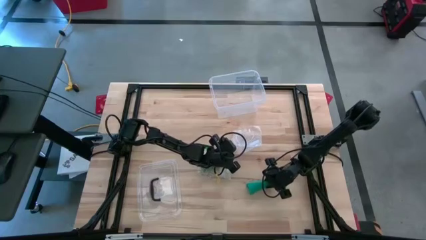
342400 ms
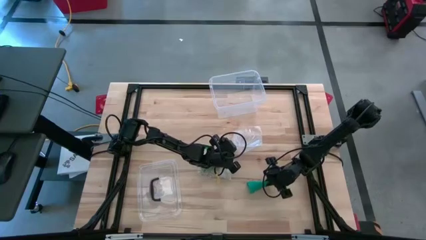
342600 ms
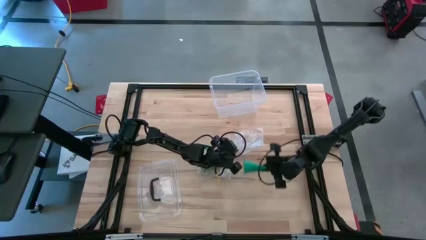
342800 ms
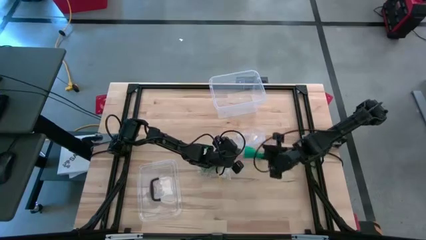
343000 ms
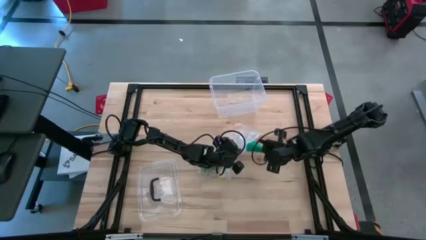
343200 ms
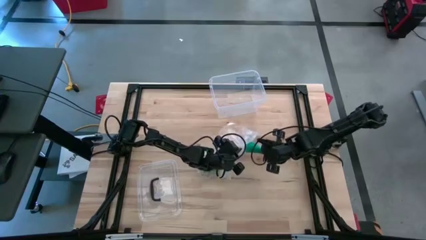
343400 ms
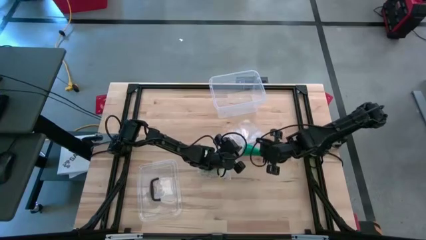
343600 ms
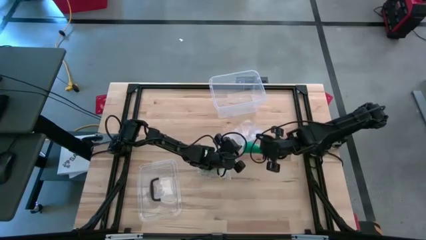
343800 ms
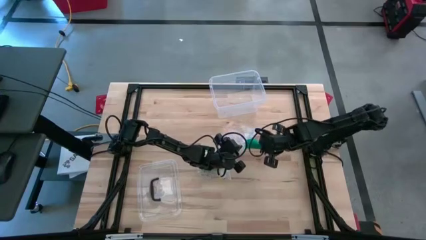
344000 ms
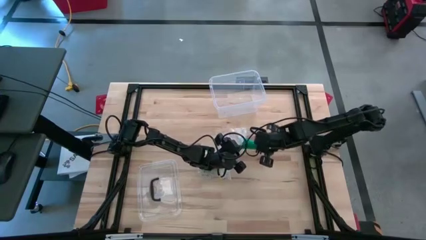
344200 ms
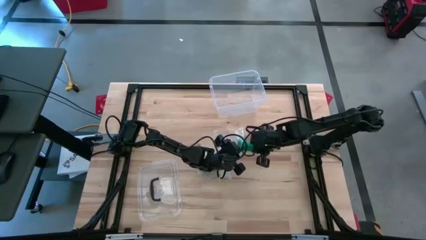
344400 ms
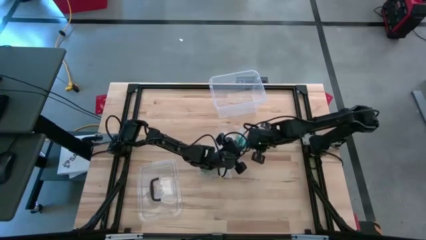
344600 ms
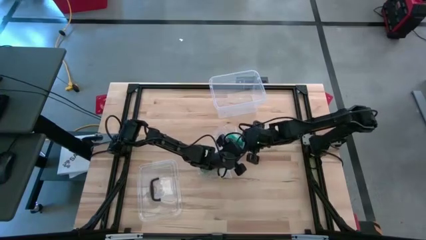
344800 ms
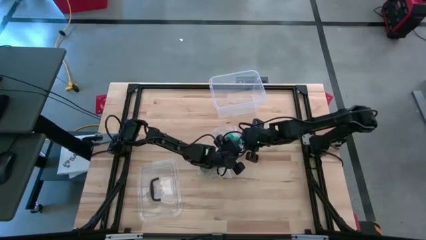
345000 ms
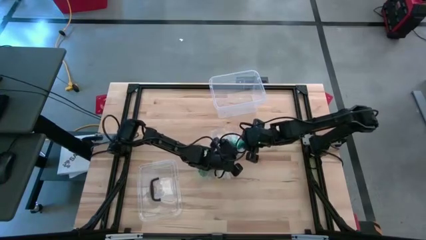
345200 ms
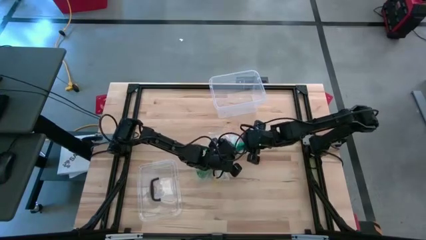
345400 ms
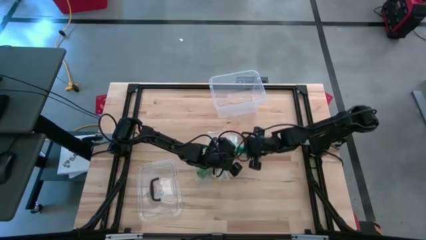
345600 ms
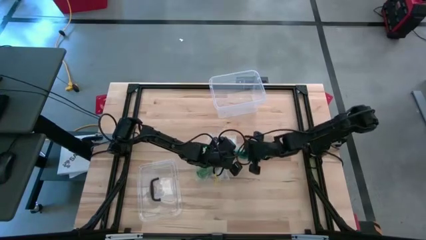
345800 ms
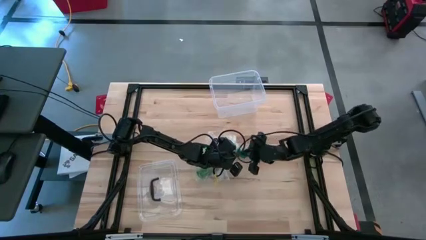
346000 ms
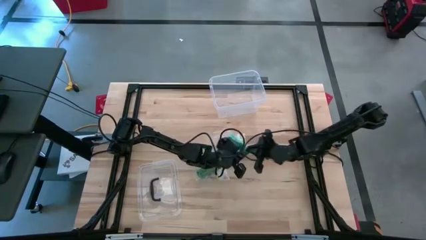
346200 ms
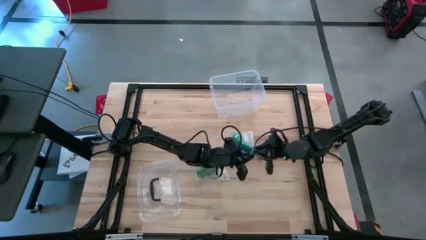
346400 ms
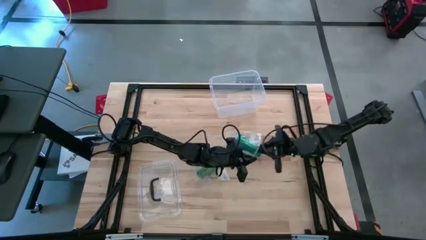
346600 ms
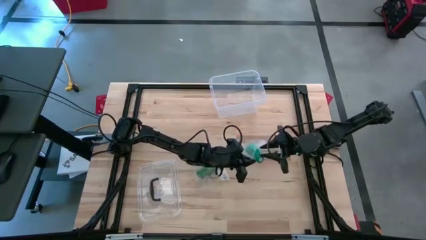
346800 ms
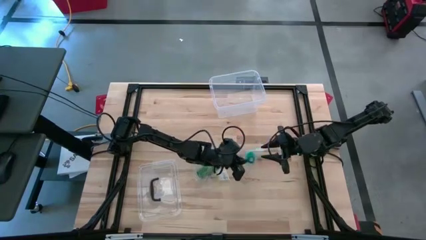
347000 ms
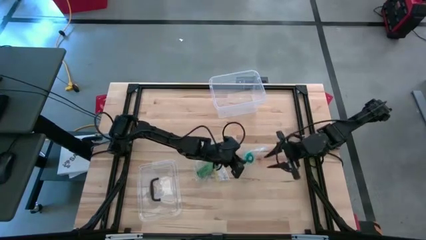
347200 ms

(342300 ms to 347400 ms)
Task: Roll bandage
Put the rolled blue bandage into the transparent zip bag

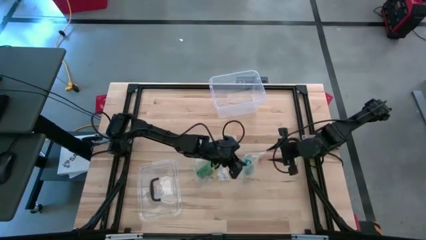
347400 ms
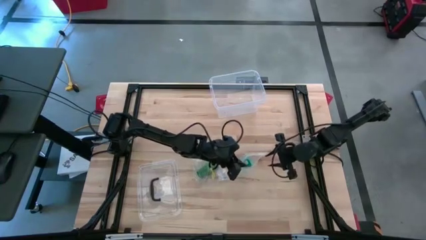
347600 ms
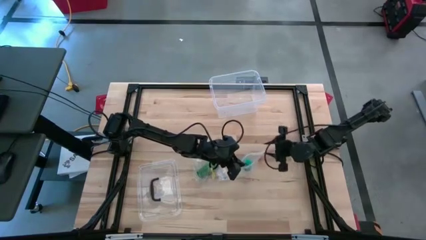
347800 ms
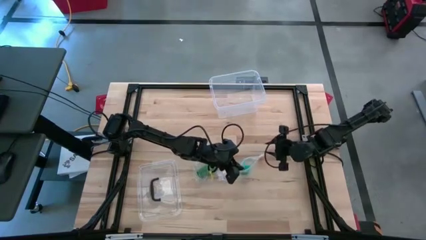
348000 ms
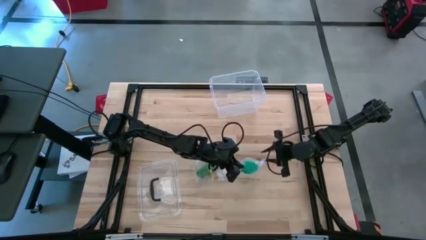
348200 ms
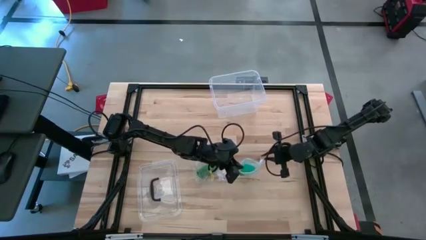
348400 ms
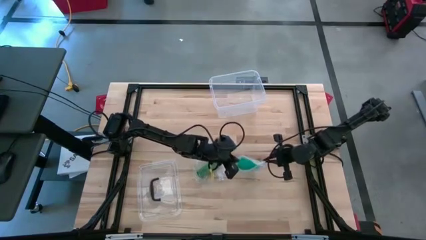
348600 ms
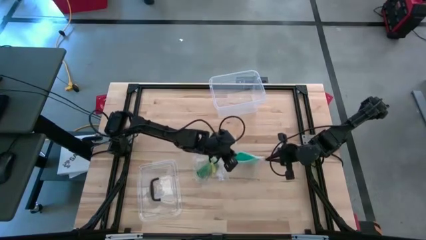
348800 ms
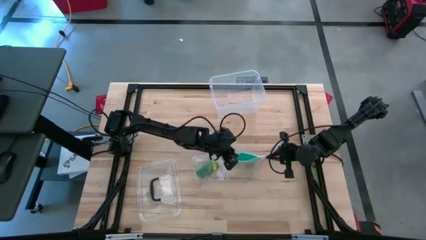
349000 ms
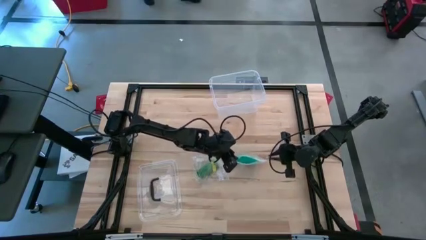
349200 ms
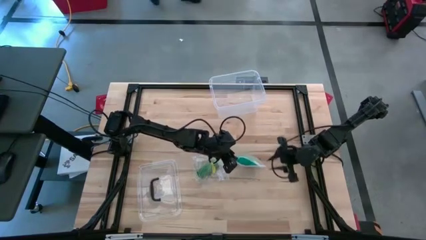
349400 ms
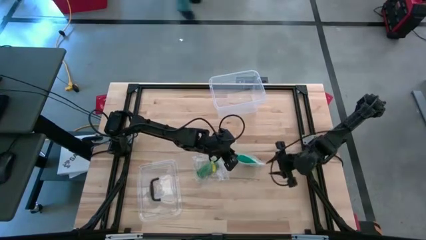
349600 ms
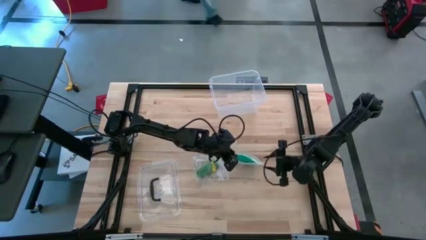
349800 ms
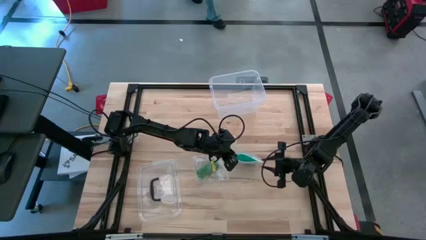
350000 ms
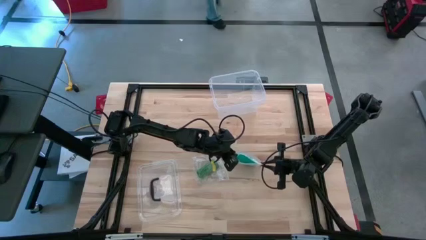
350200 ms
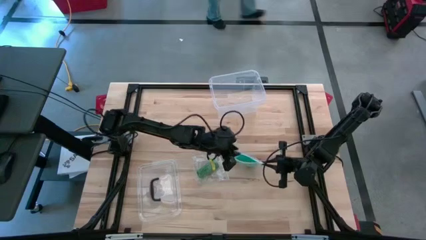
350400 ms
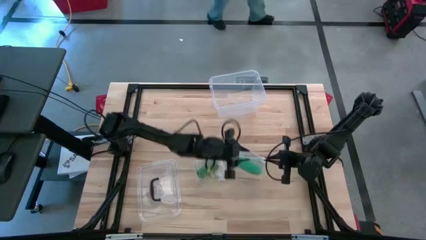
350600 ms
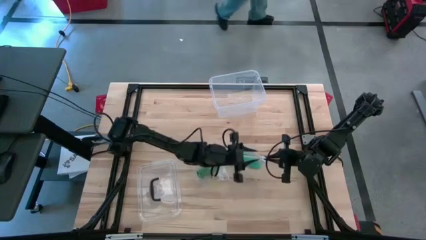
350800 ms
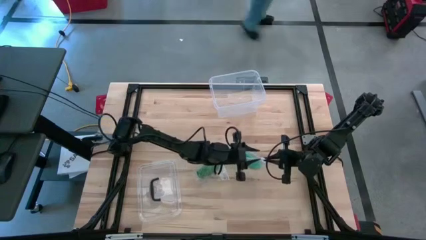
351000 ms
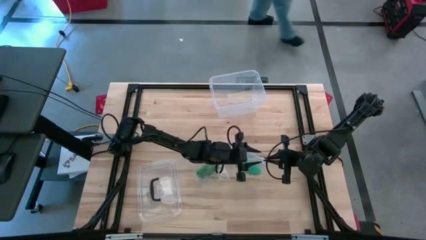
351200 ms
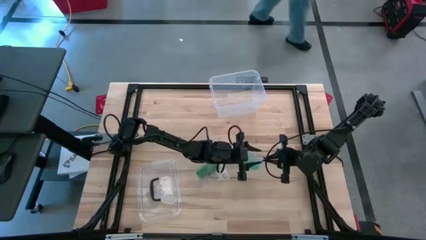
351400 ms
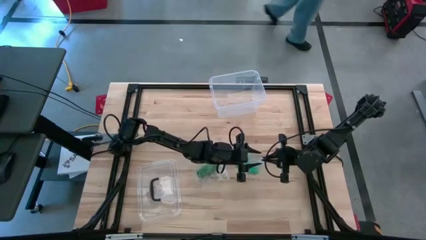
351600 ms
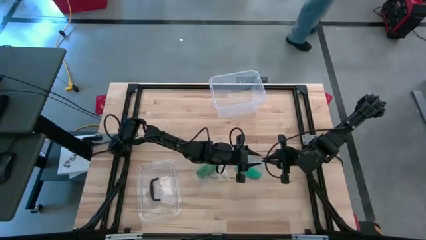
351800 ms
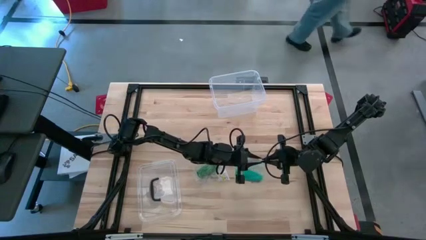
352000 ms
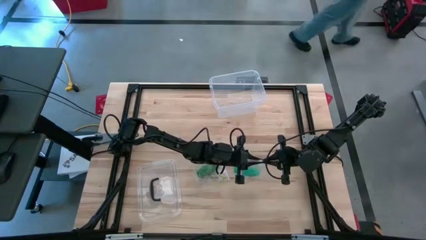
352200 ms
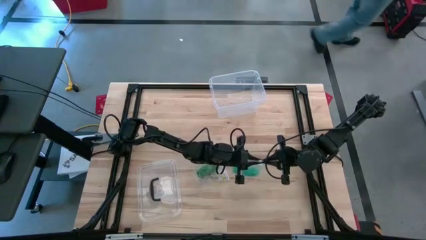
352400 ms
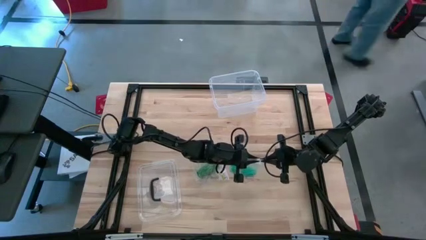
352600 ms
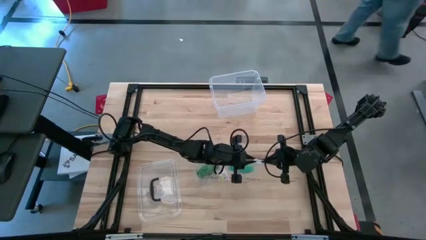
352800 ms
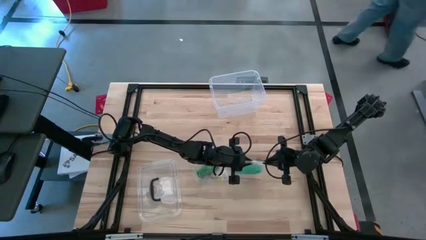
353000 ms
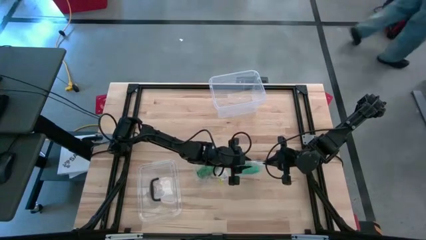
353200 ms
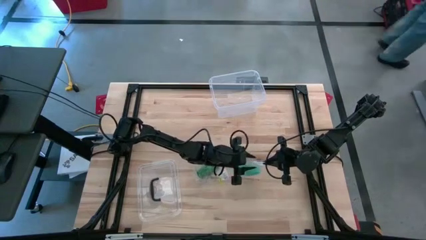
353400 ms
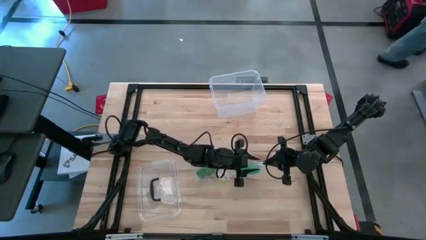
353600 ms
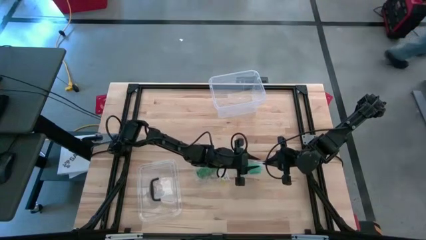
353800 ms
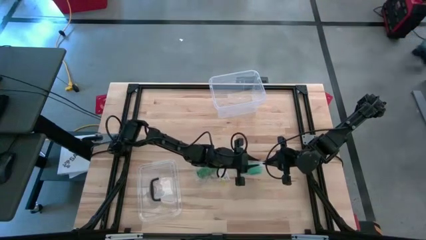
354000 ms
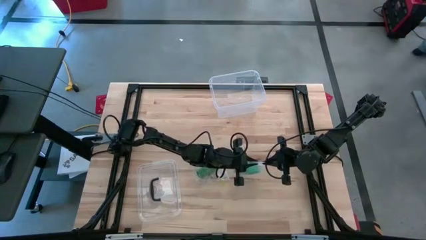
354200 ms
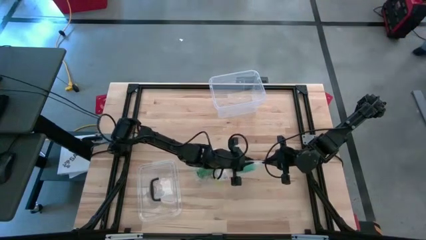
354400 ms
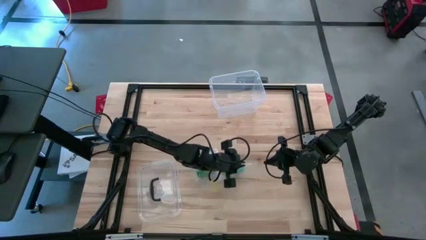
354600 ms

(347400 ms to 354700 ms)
Close the transparent zip bag

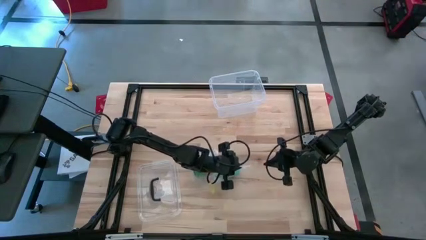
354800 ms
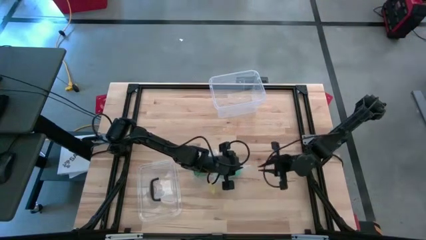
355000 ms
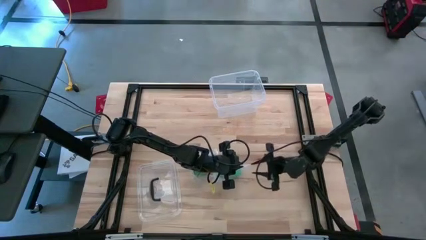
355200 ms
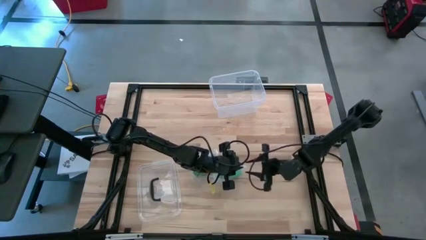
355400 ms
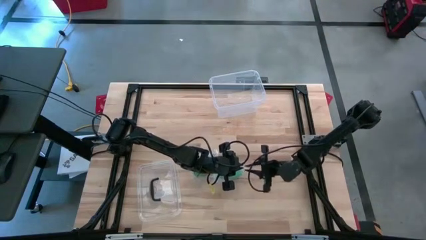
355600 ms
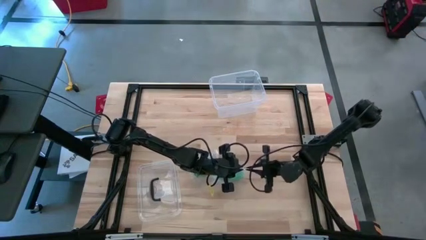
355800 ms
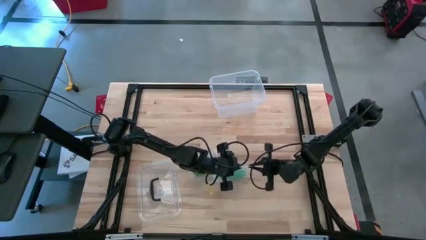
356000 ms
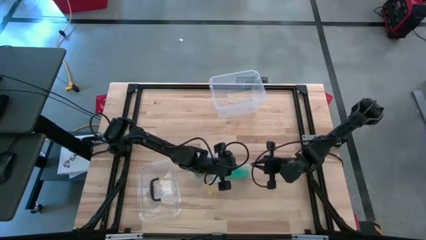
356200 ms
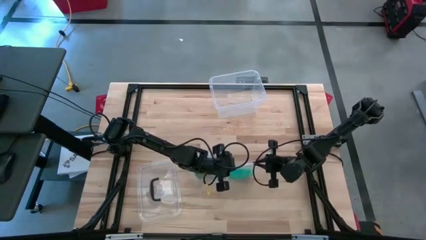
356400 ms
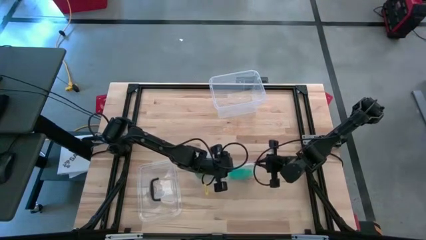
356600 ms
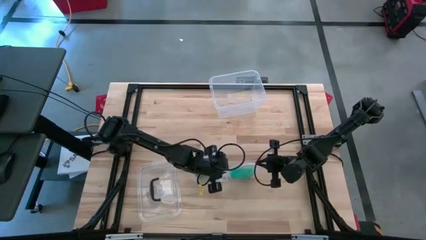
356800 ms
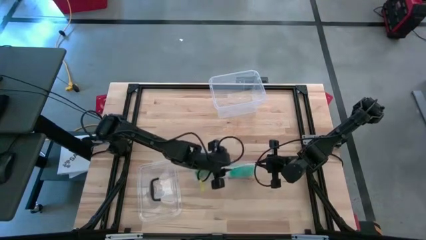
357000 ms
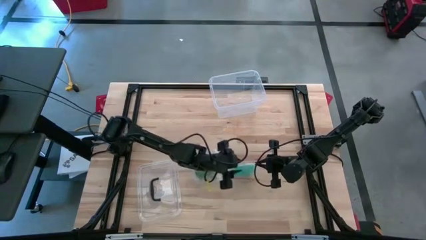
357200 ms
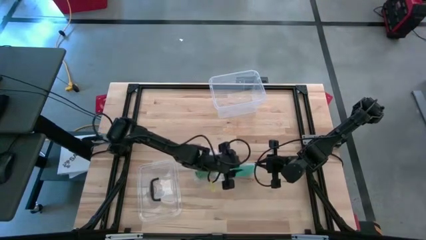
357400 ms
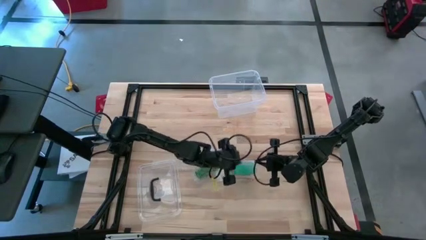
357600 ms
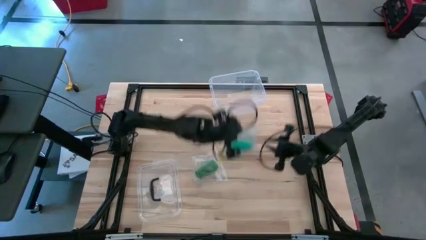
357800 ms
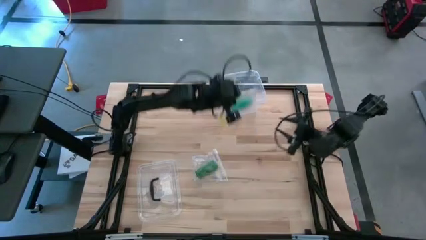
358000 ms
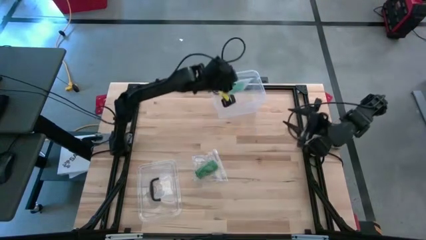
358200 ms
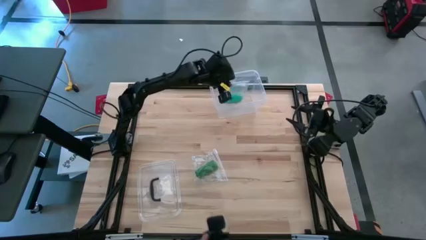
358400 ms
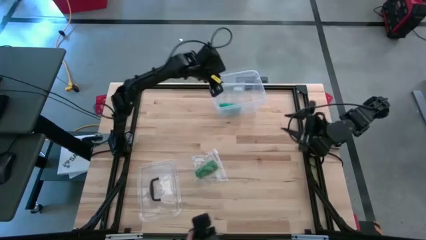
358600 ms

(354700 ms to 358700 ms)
Close the transparent zip bag
